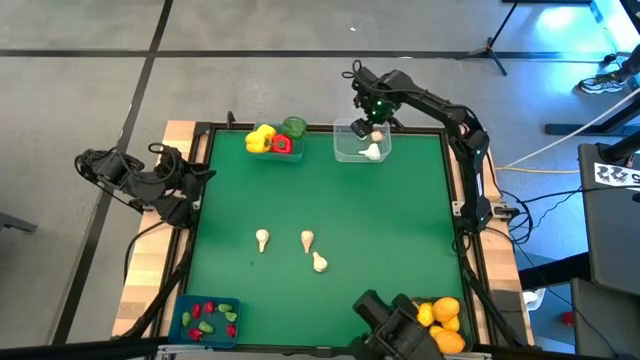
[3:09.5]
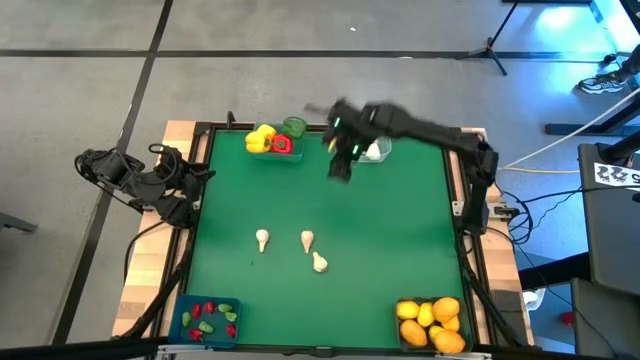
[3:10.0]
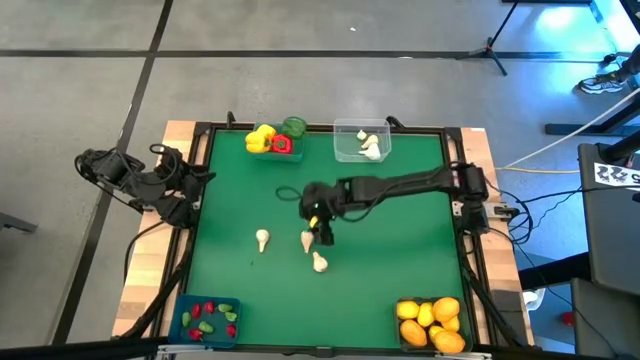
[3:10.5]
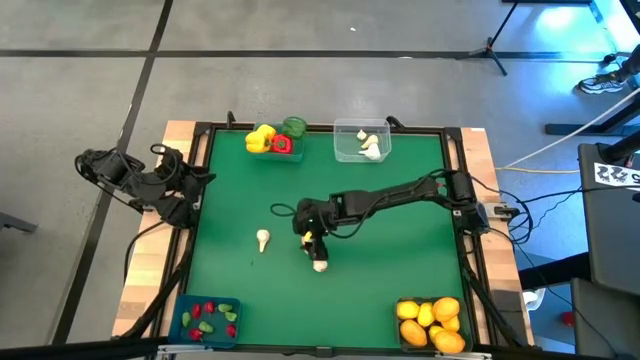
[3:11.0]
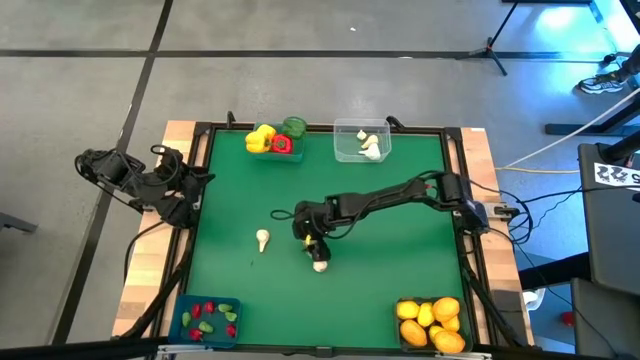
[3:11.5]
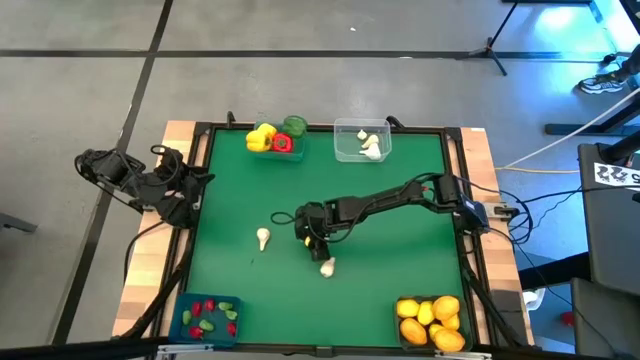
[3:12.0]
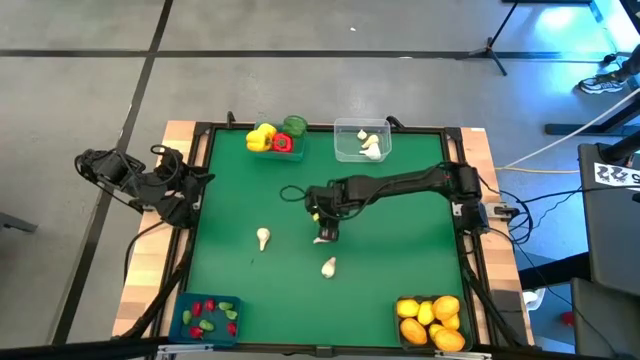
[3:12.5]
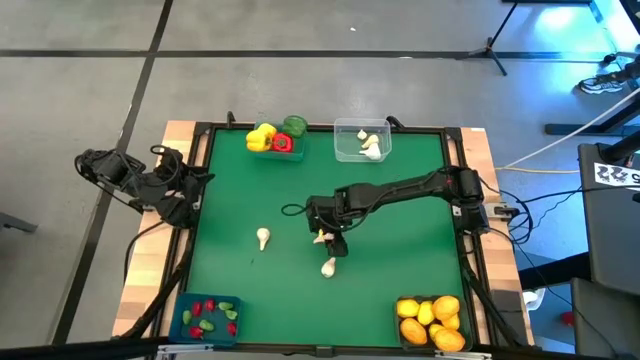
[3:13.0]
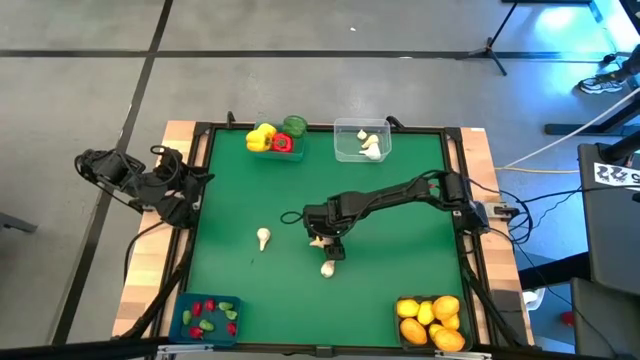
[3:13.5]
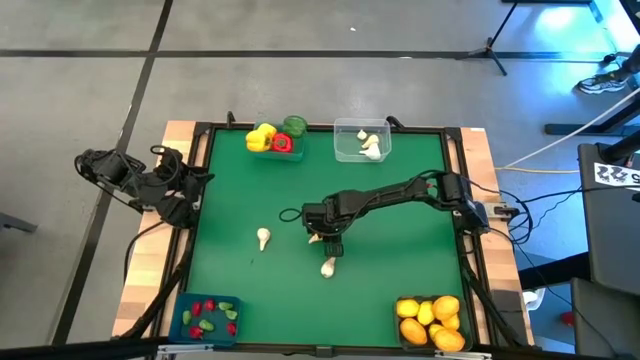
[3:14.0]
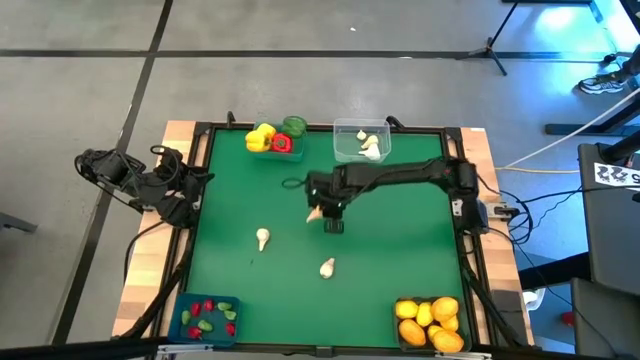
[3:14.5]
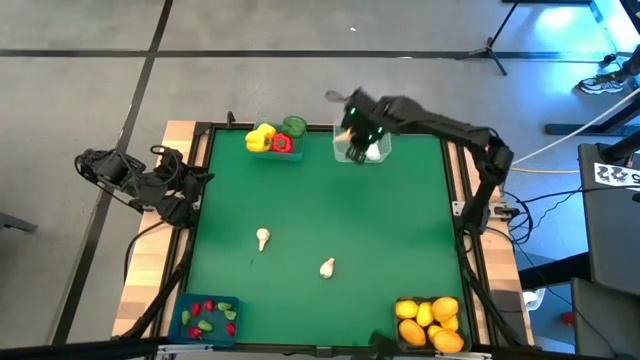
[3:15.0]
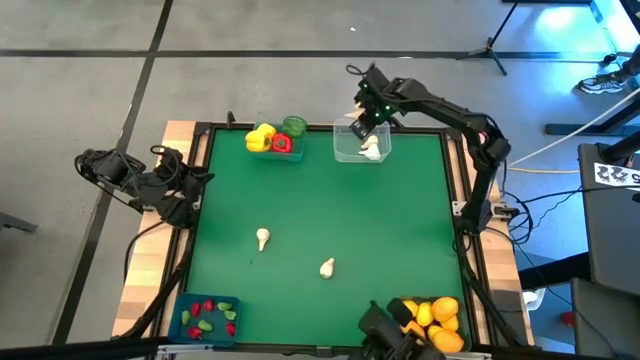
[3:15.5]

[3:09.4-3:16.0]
Task: Sort produce into baskets
Put the garlic into the transparent bin

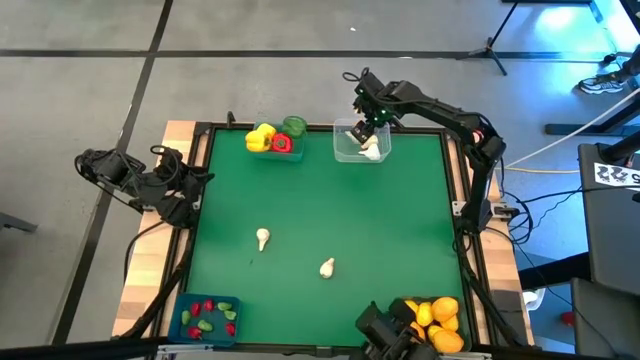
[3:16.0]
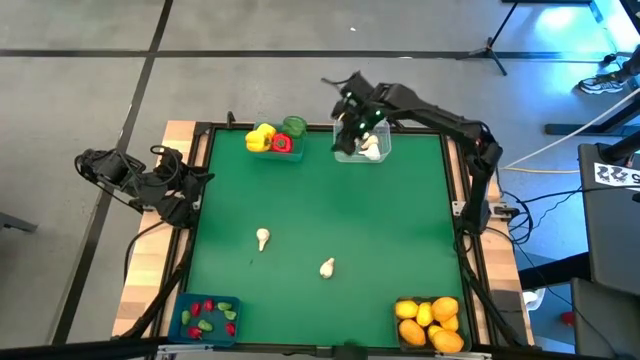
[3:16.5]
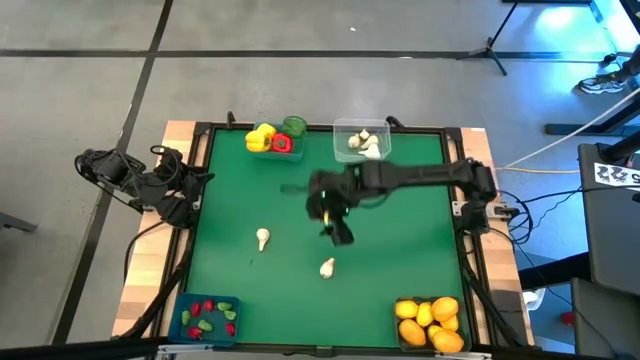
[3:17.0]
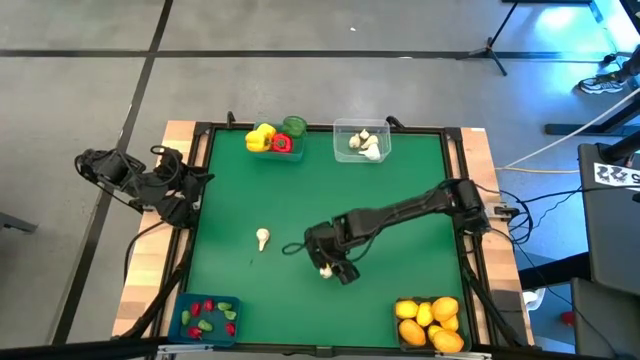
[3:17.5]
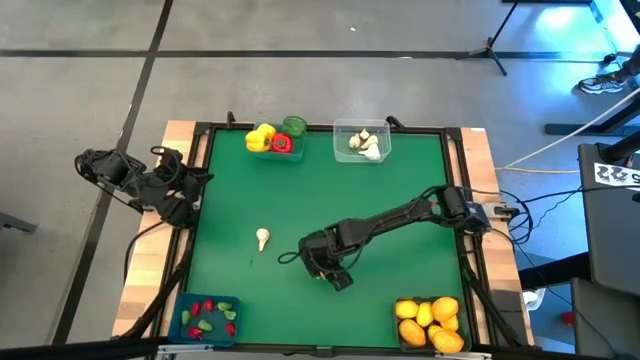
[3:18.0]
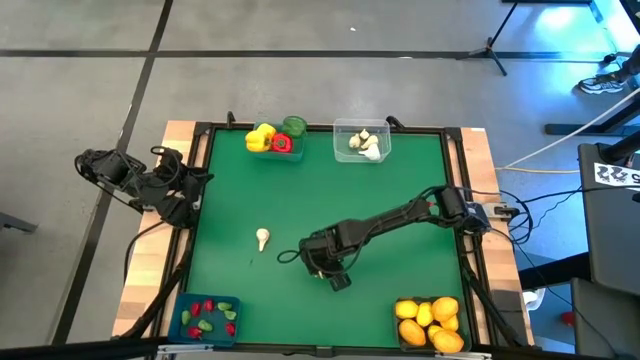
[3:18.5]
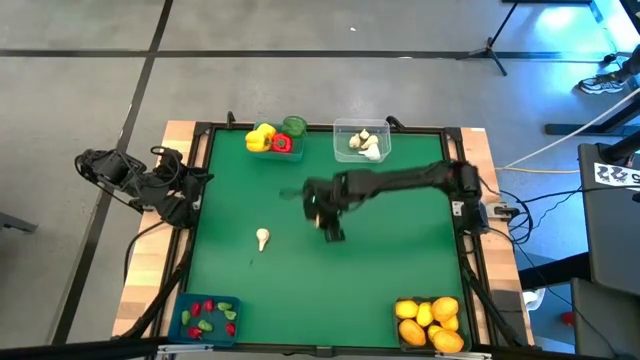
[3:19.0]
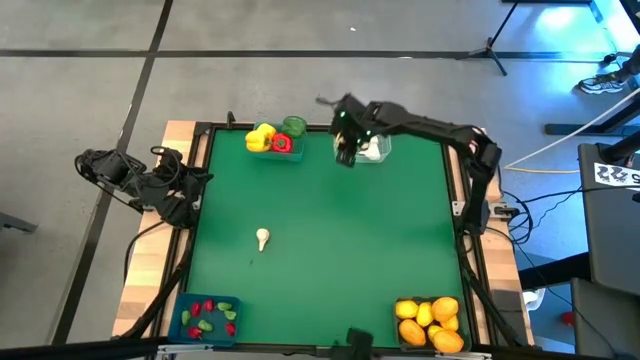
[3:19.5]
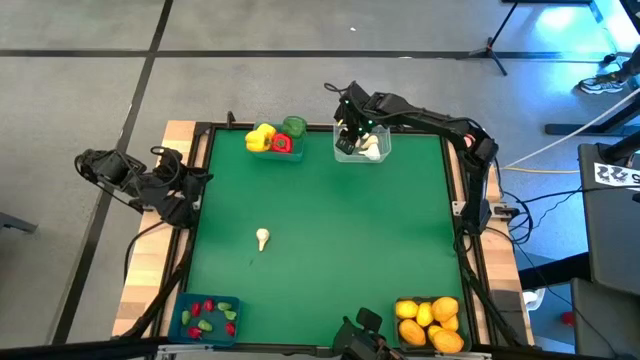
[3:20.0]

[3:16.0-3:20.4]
Put the garlic into the transparent bin

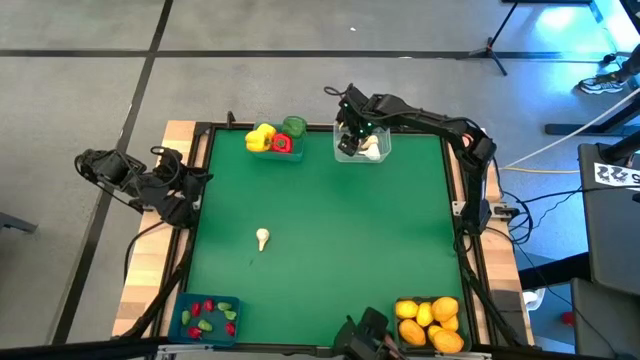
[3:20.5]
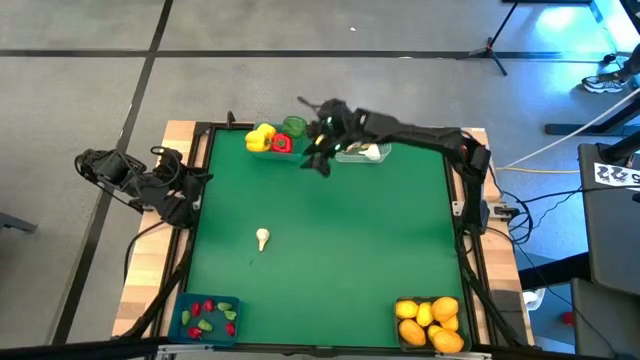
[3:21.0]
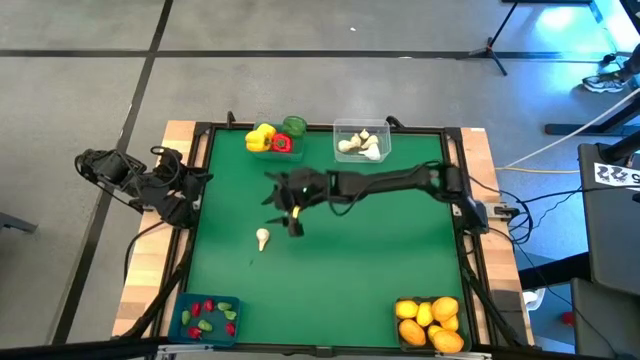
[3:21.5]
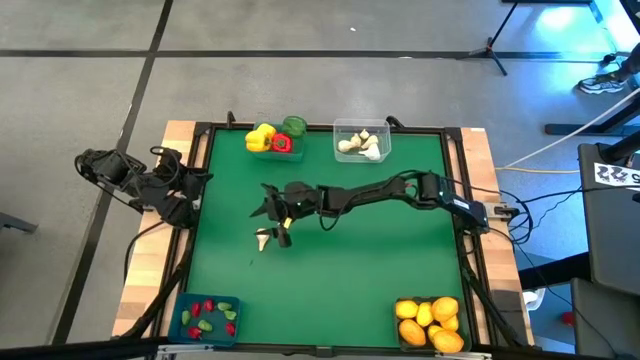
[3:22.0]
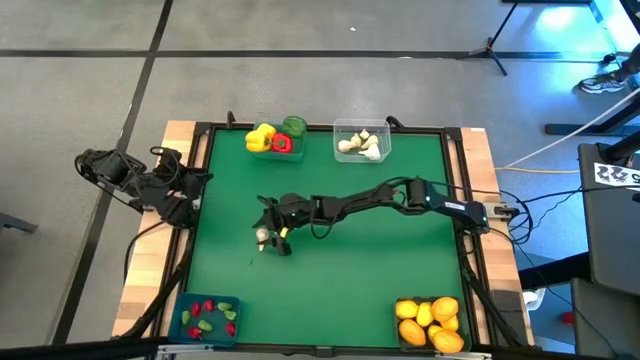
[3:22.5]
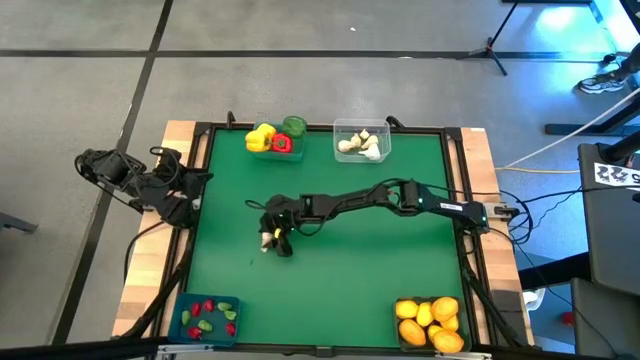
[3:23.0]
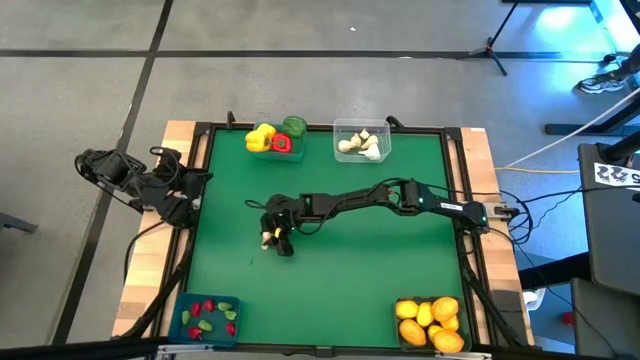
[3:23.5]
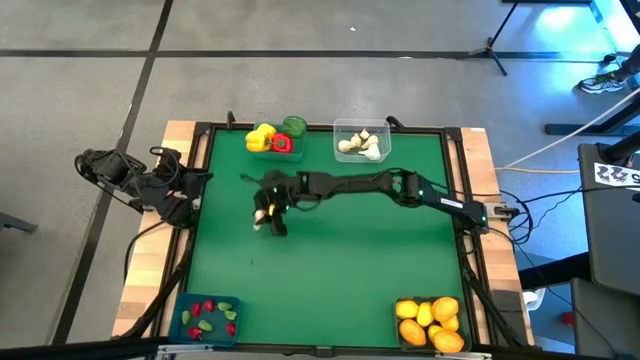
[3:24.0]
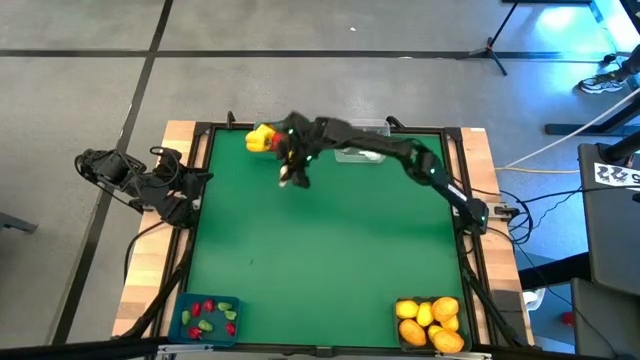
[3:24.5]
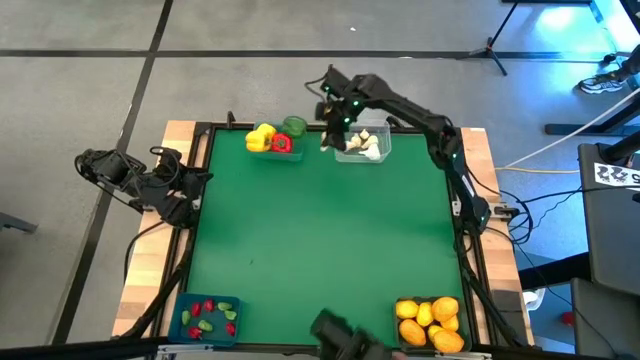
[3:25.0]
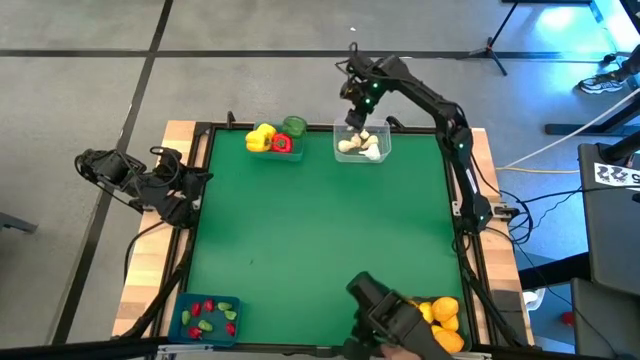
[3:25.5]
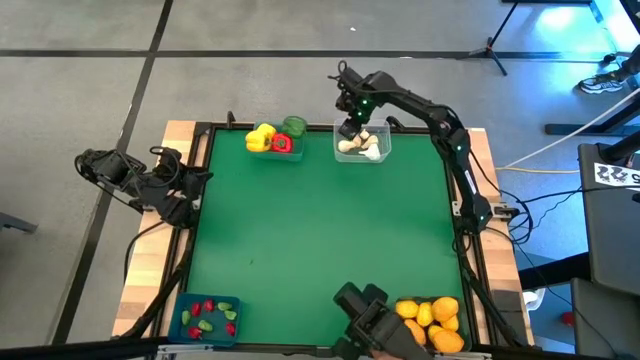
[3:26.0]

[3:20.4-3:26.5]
Put the garlic into the transparent bin

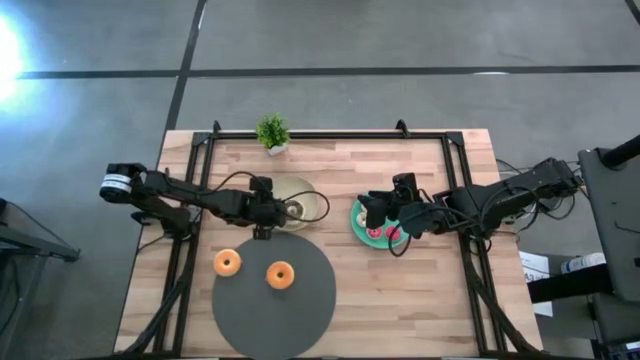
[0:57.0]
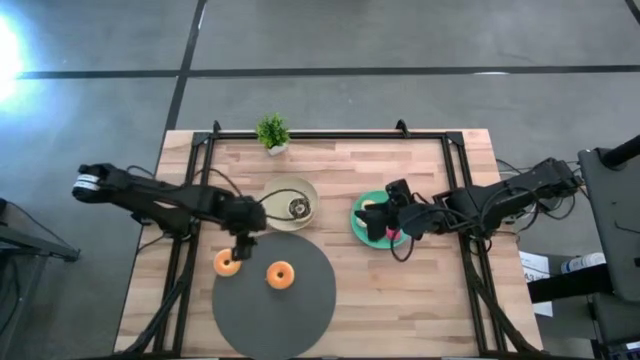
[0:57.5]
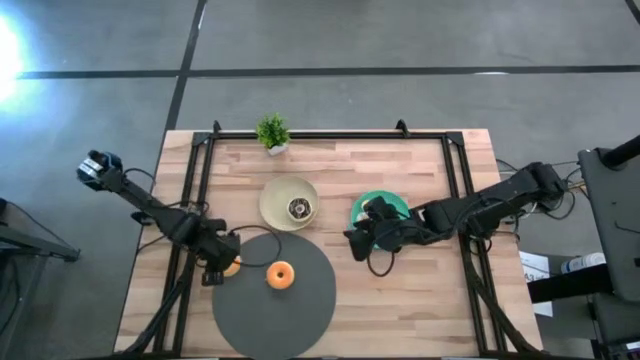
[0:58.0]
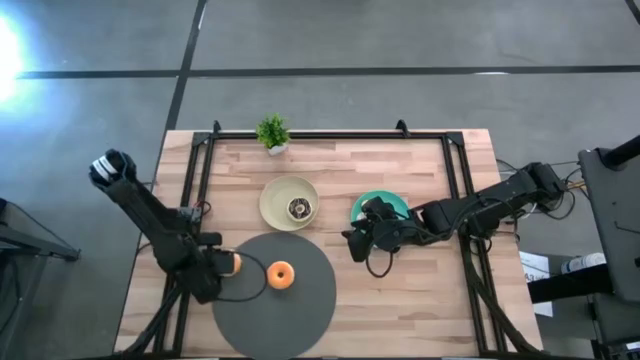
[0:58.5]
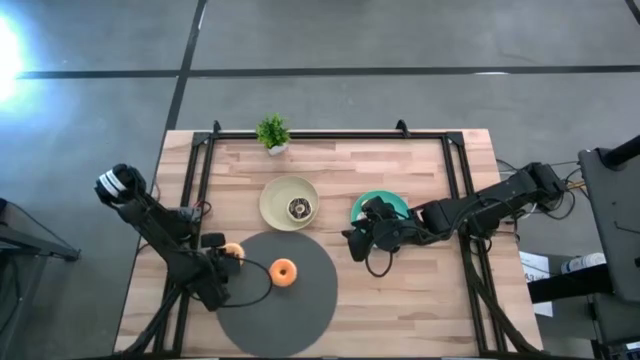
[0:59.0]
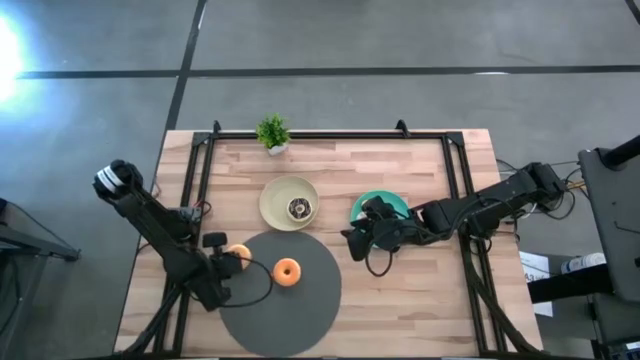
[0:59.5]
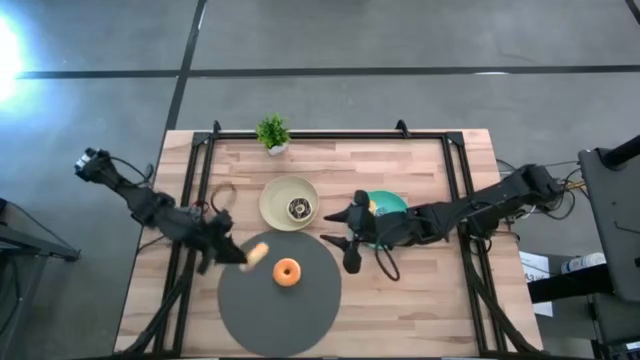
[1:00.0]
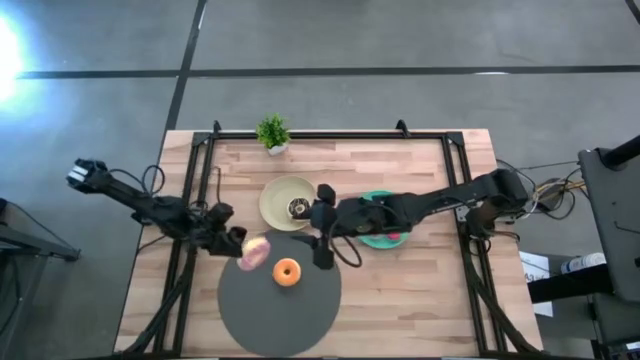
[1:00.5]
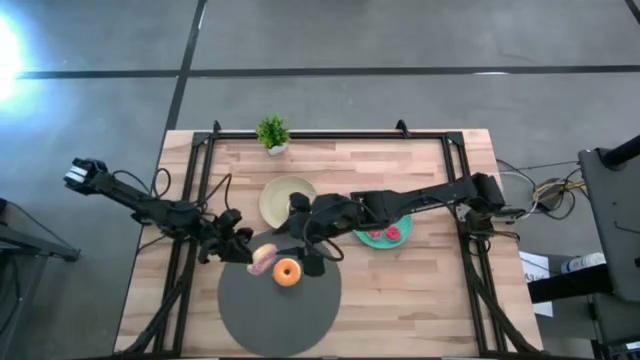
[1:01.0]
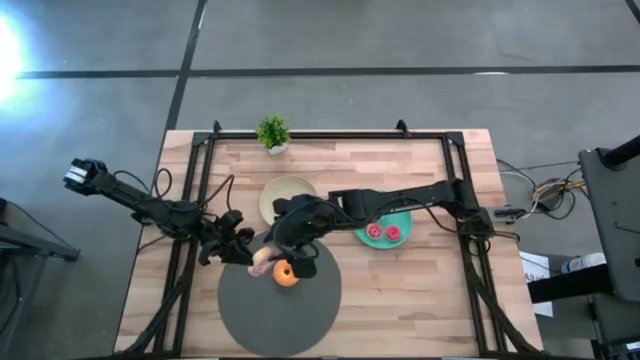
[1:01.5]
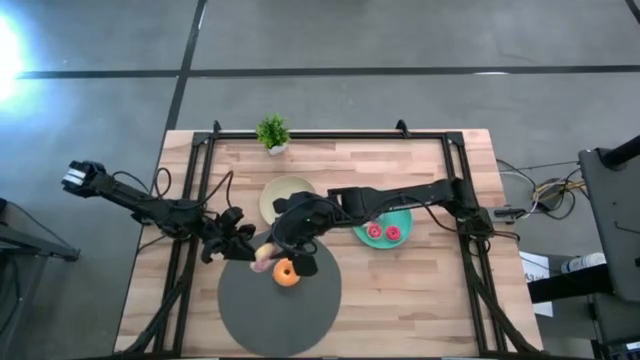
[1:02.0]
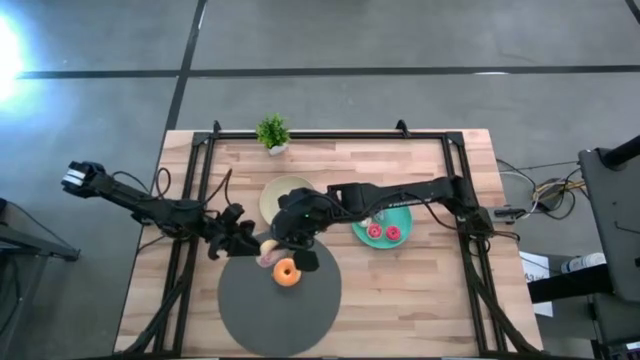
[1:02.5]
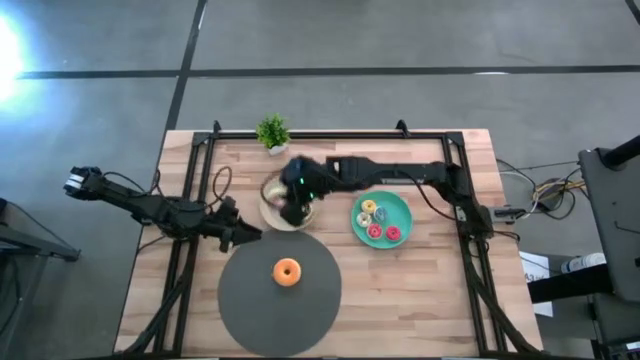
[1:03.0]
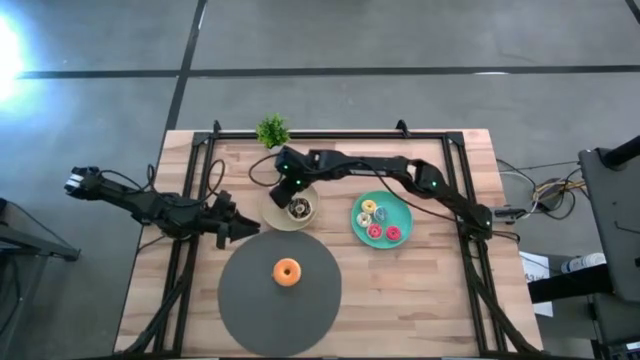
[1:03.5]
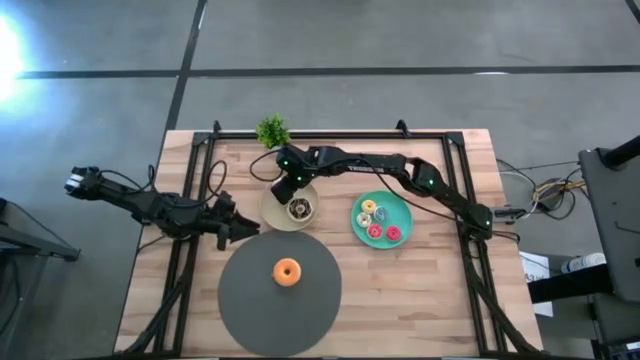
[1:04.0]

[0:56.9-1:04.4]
Task: Pick & Place donuts
Put the large pink donut on the brown plate
